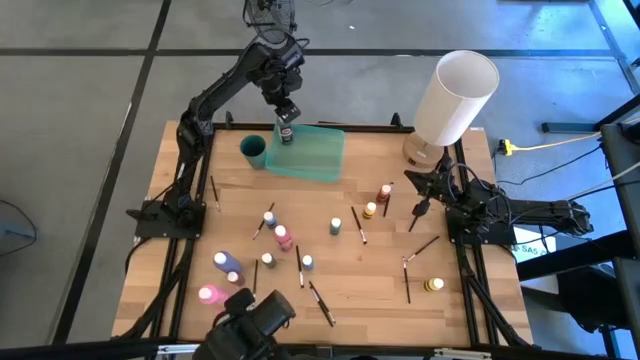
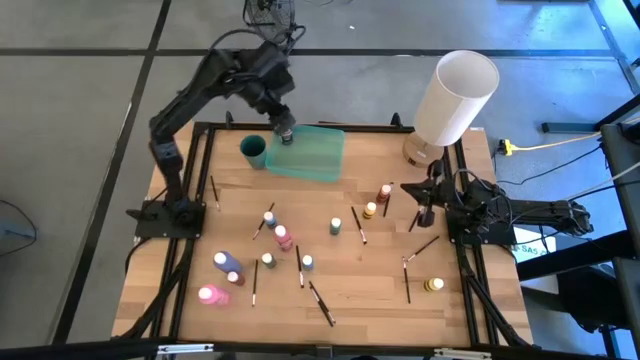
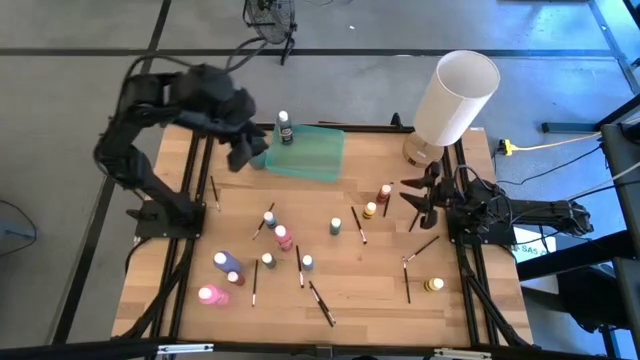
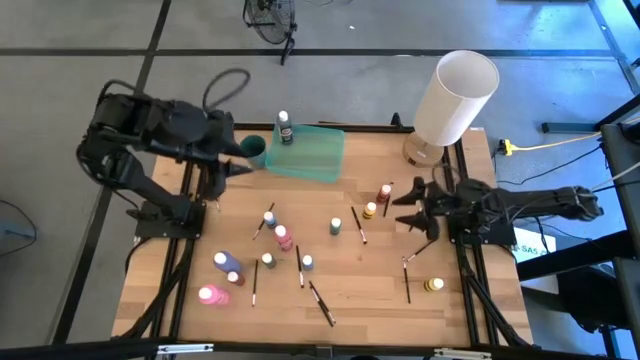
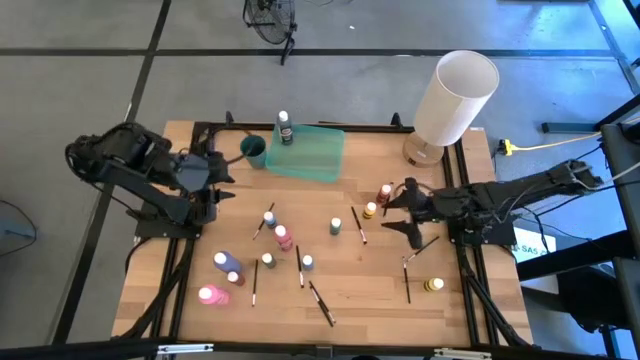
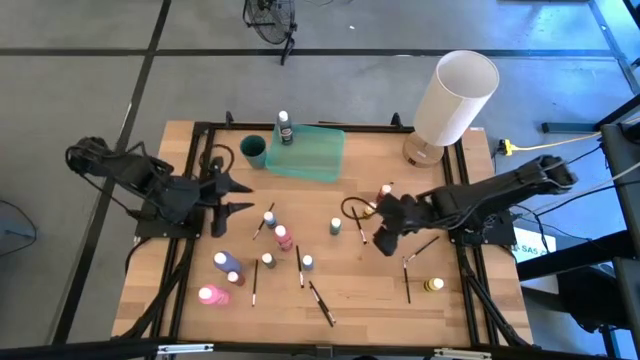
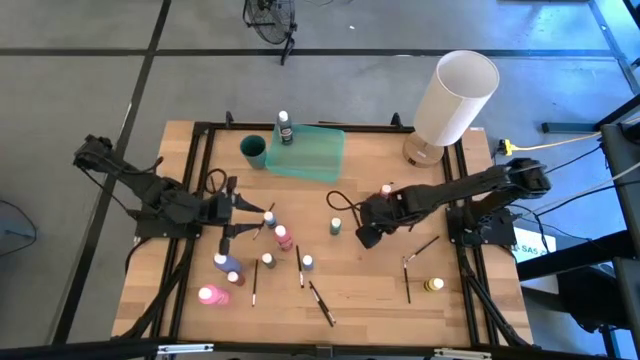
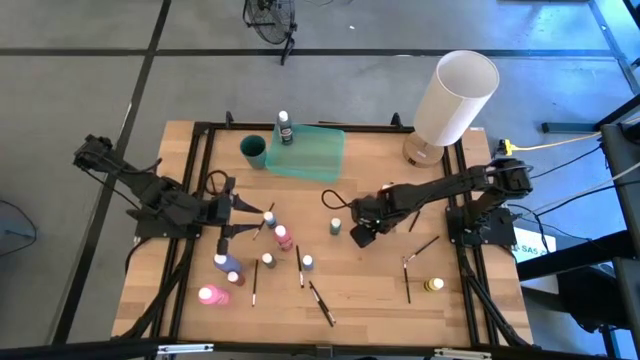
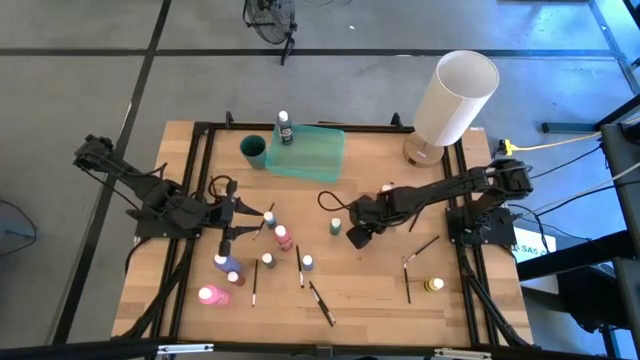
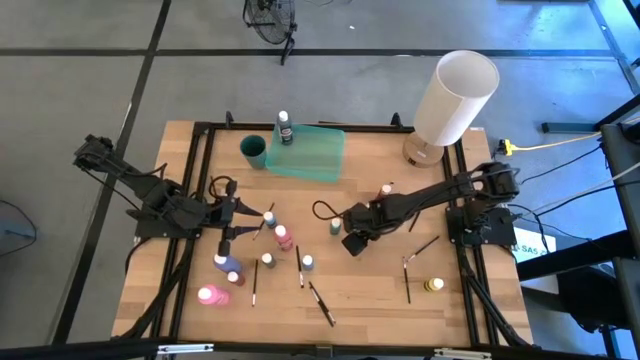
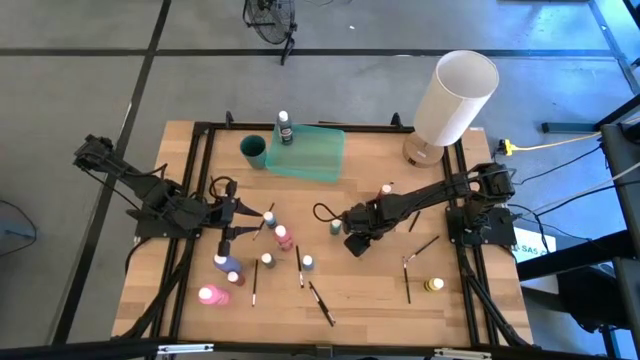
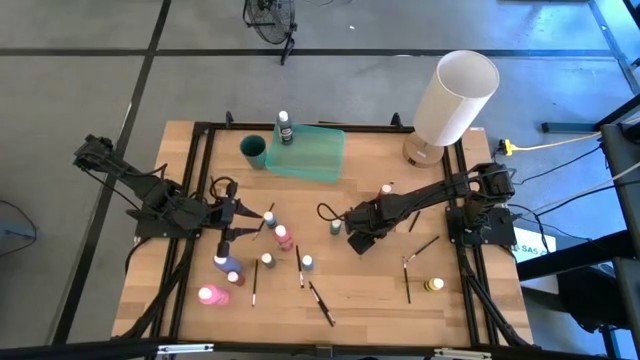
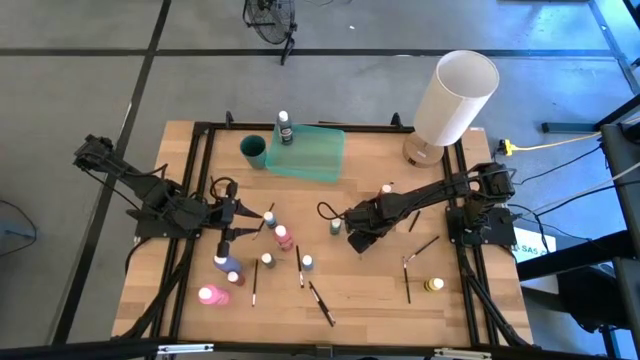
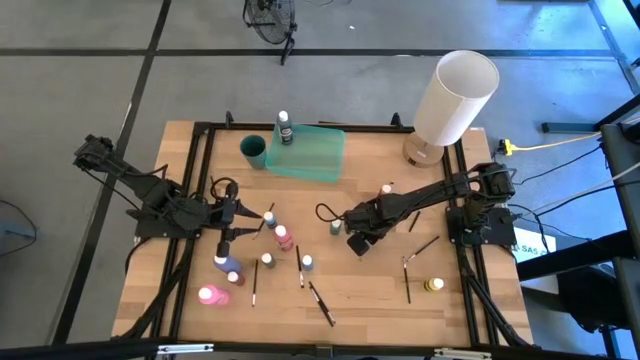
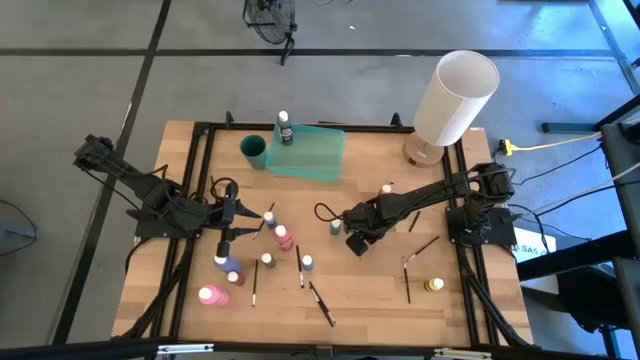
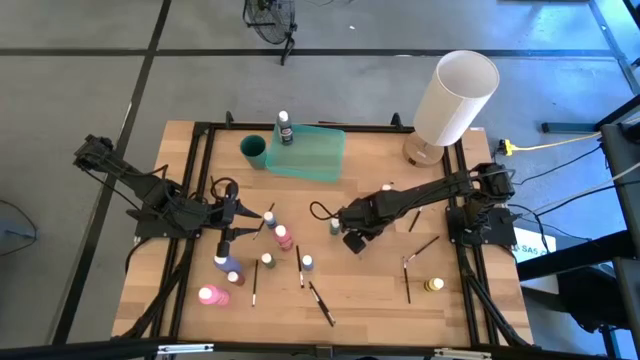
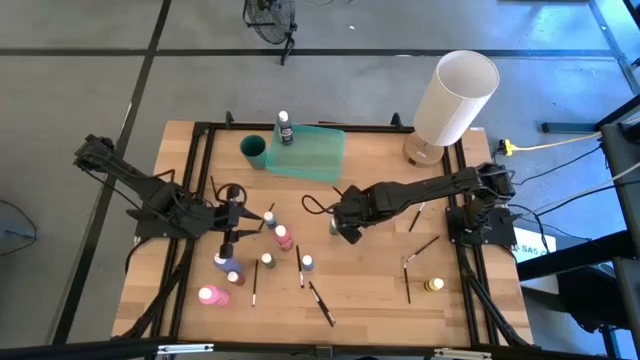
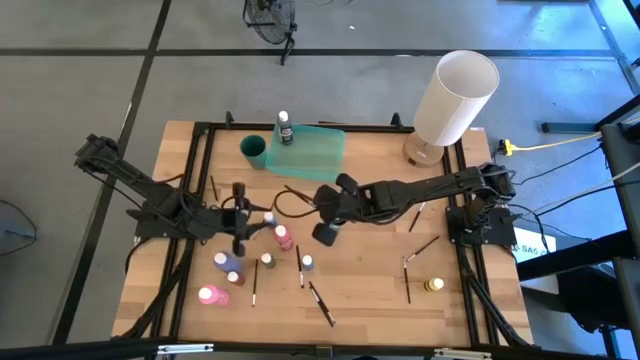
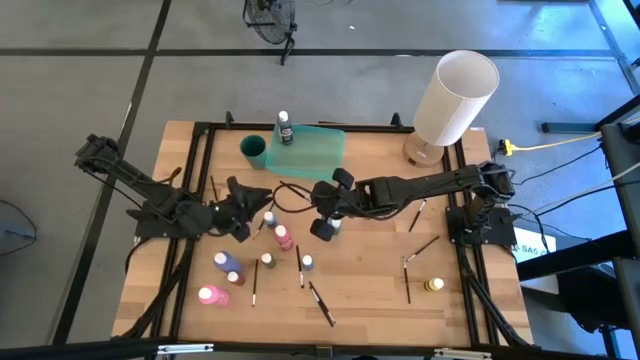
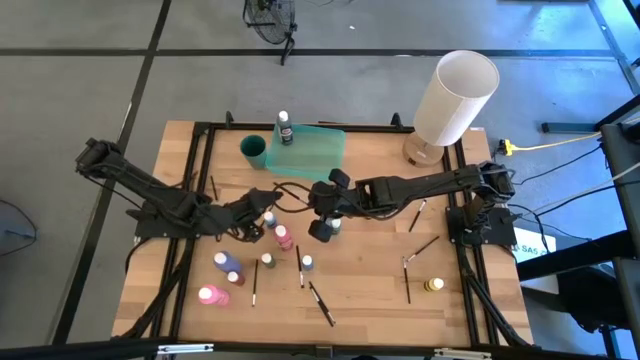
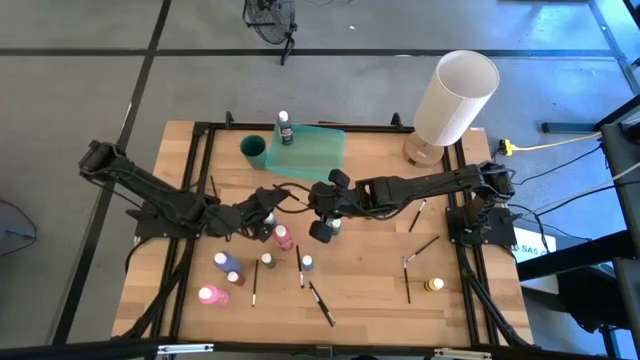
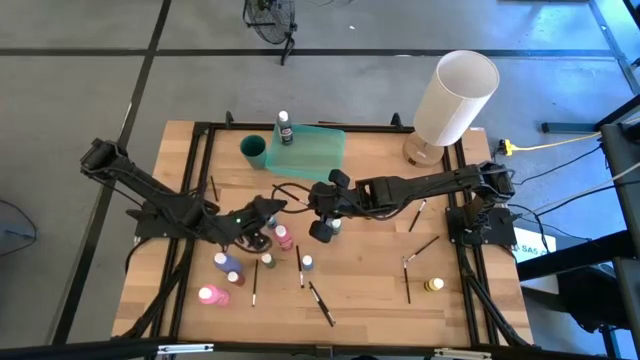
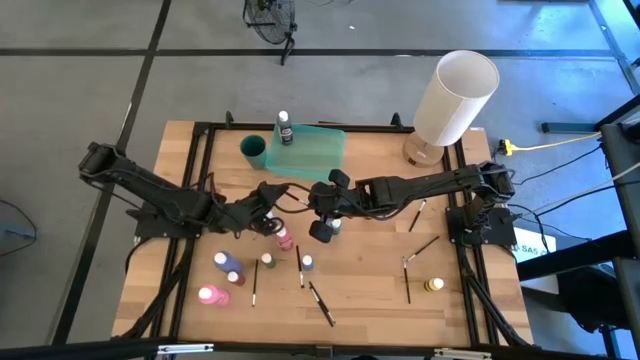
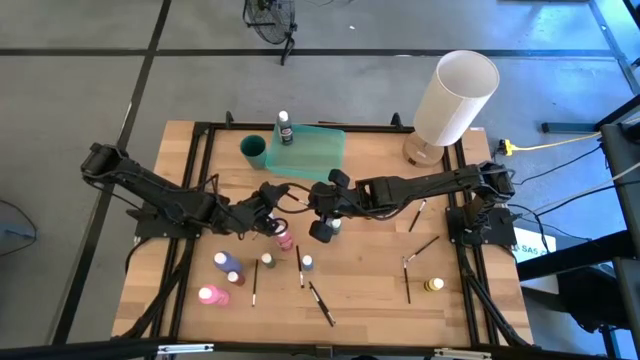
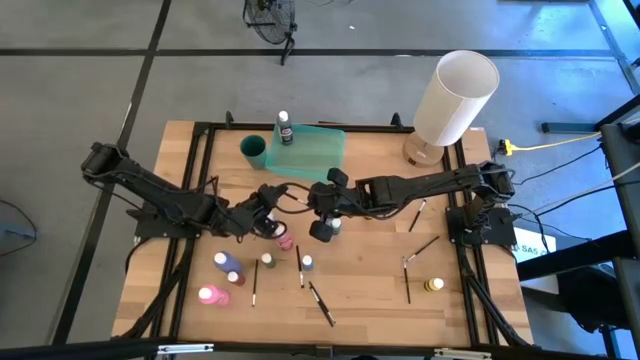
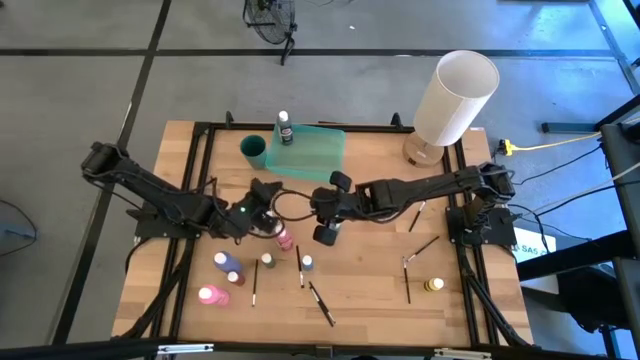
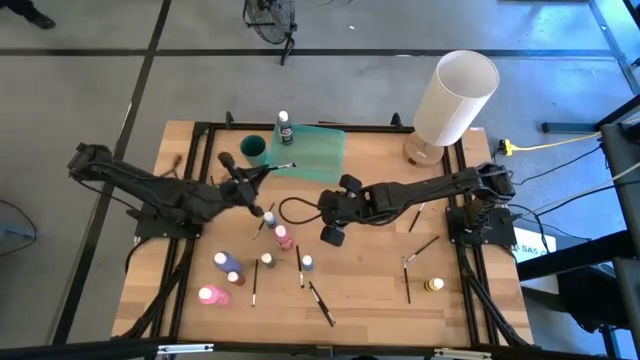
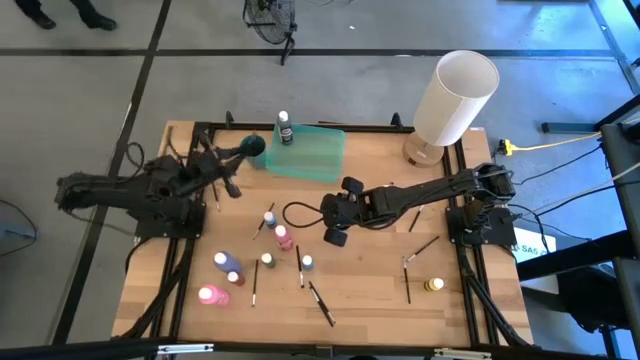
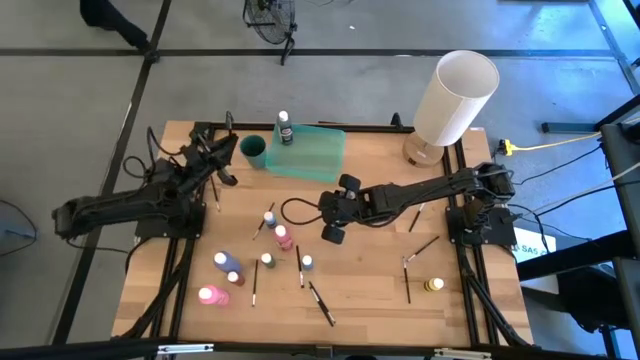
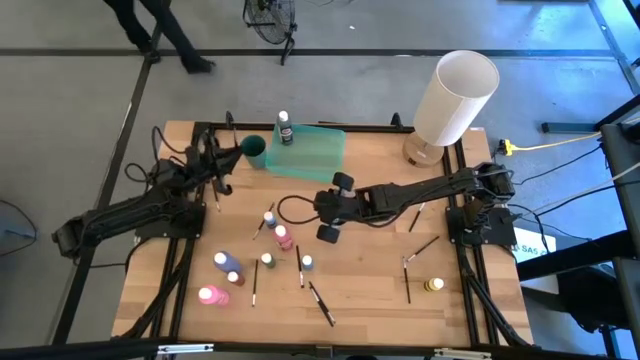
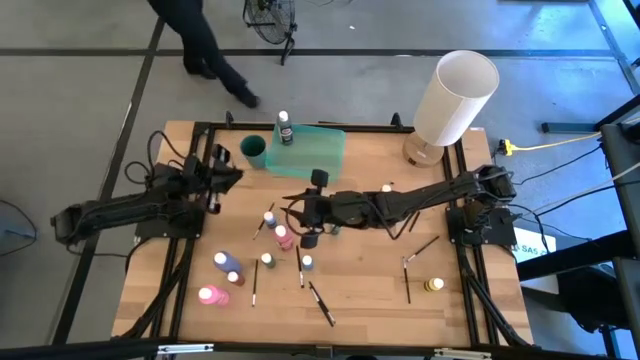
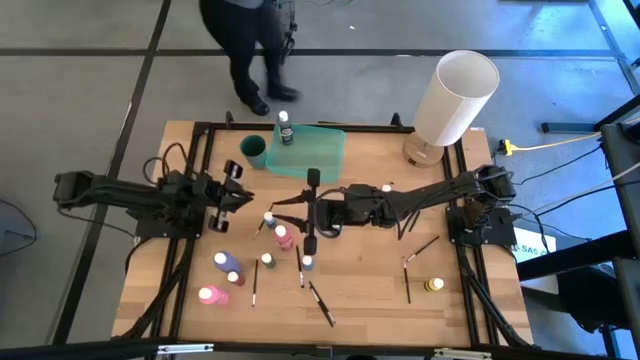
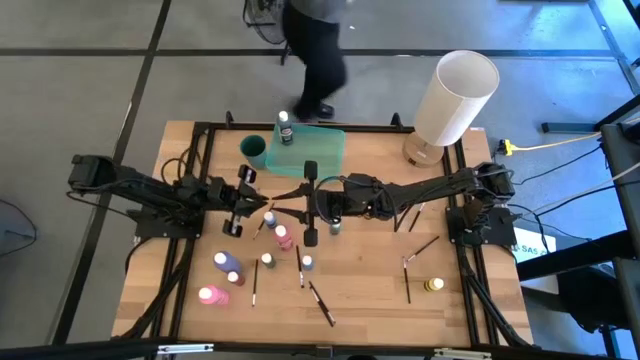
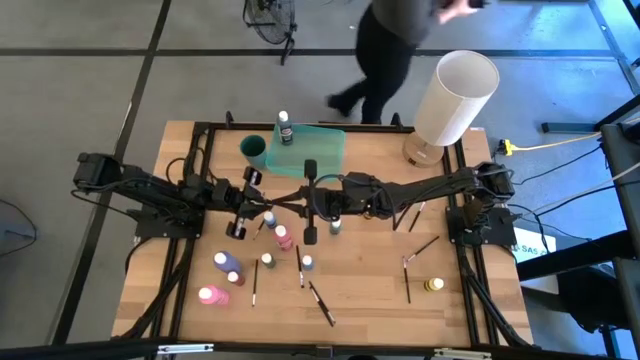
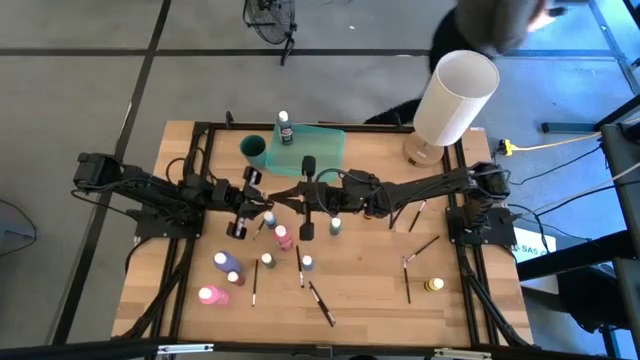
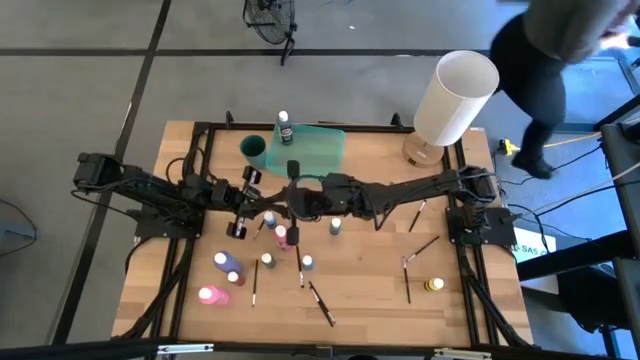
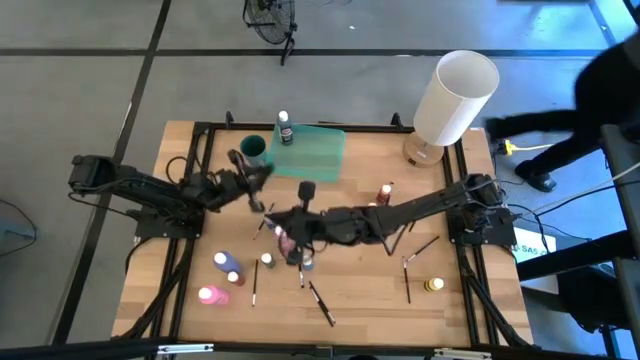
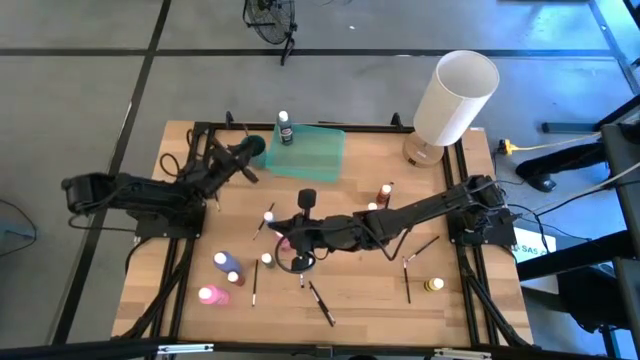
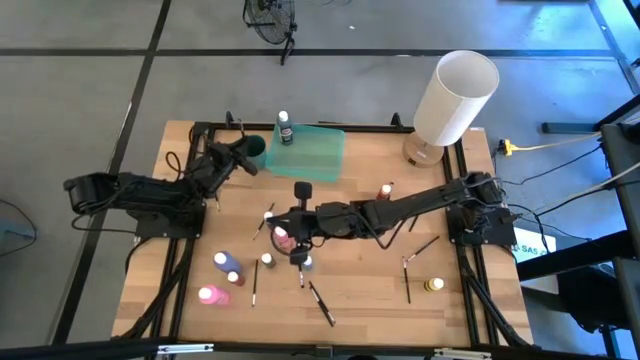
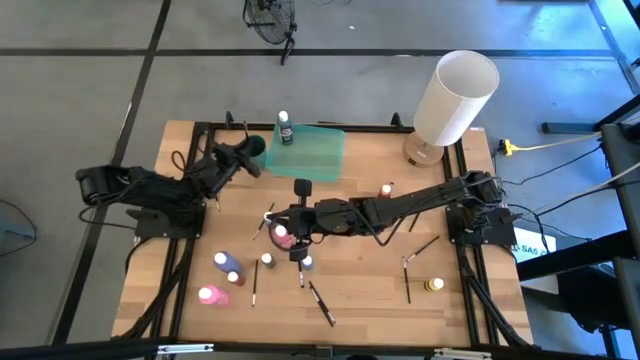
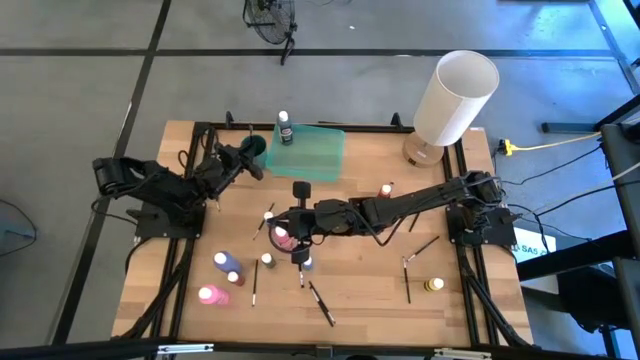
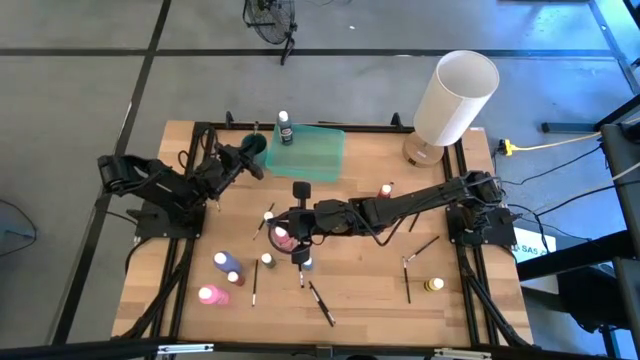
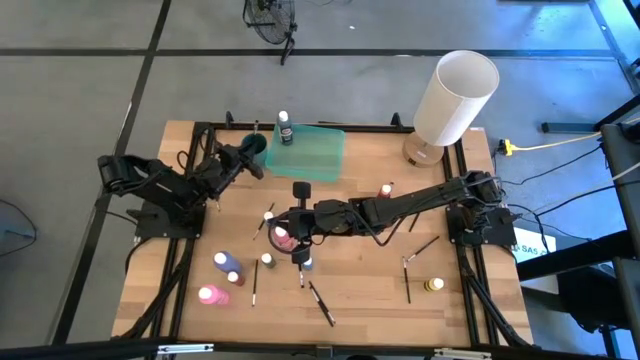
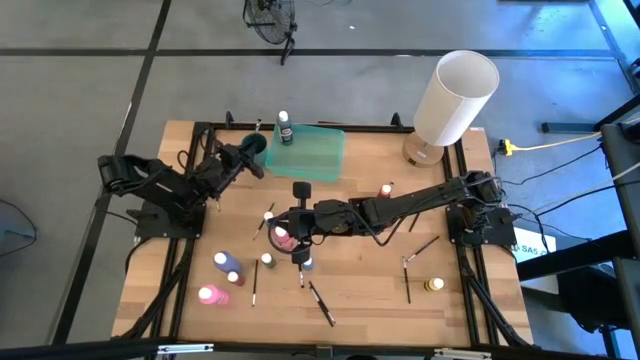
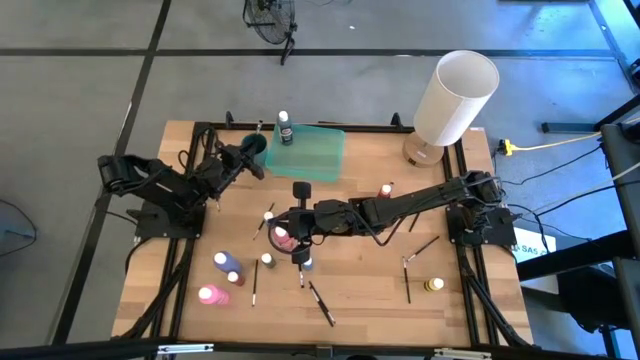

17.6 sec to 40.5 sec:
Task: Pick & Place Paint Supplies
Put the silver paintbrush into the green cup
